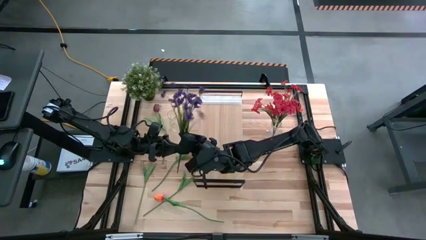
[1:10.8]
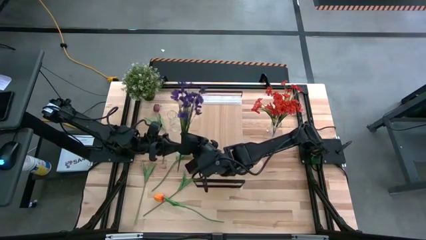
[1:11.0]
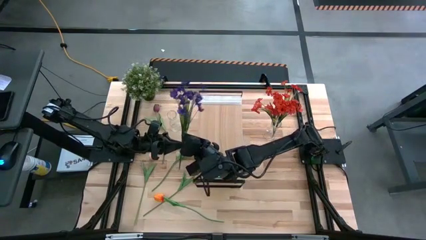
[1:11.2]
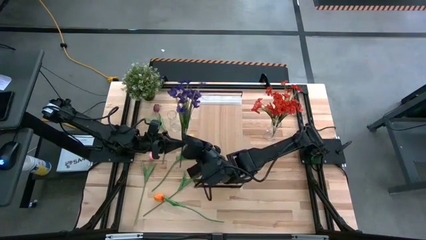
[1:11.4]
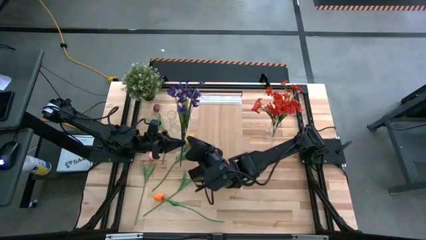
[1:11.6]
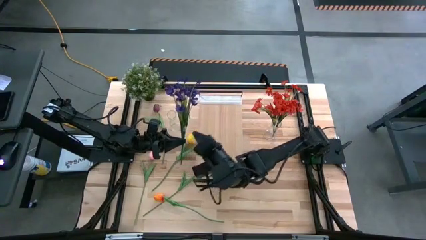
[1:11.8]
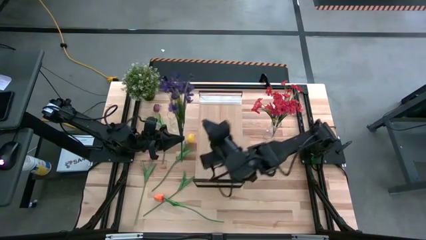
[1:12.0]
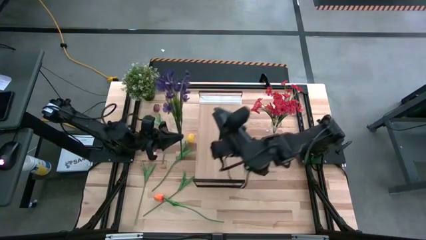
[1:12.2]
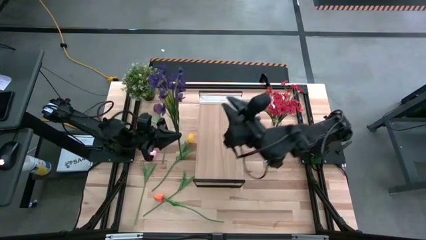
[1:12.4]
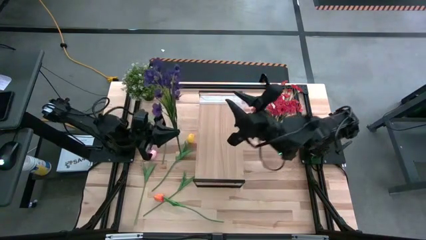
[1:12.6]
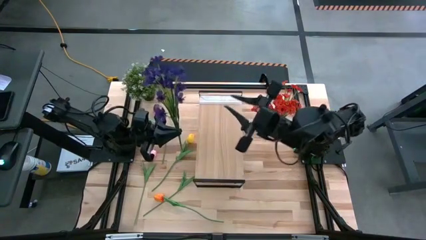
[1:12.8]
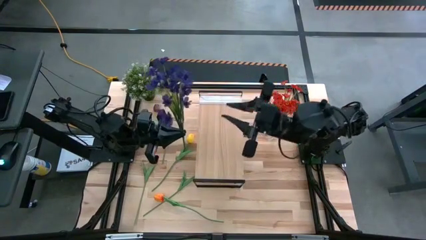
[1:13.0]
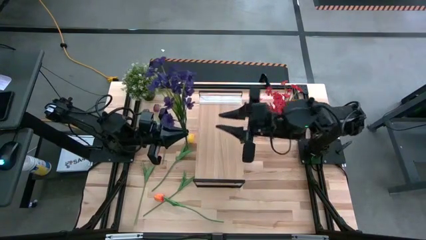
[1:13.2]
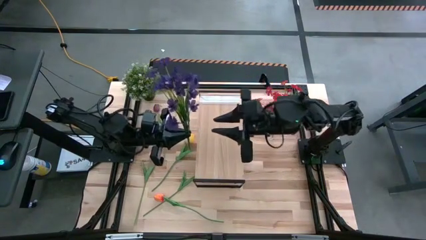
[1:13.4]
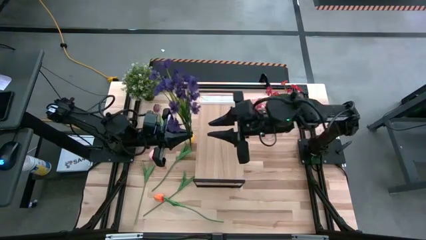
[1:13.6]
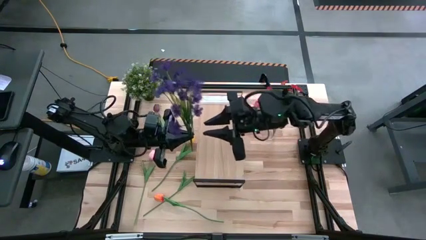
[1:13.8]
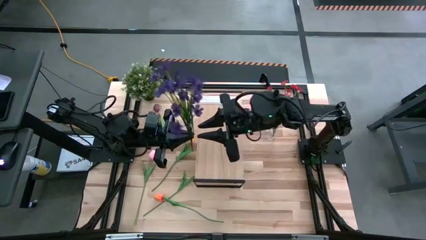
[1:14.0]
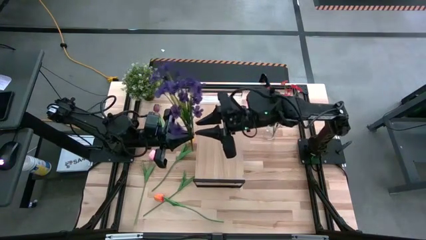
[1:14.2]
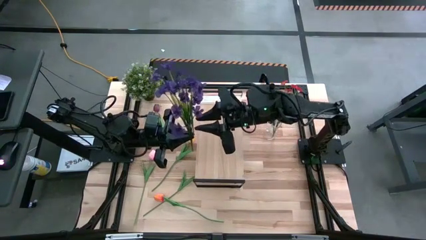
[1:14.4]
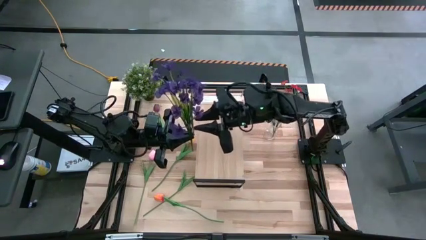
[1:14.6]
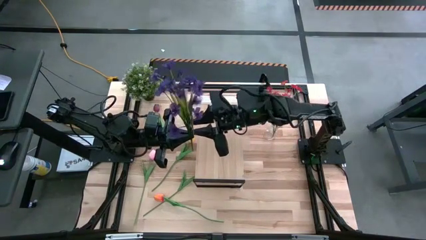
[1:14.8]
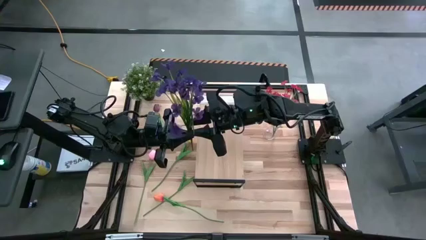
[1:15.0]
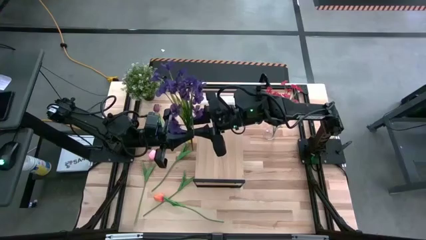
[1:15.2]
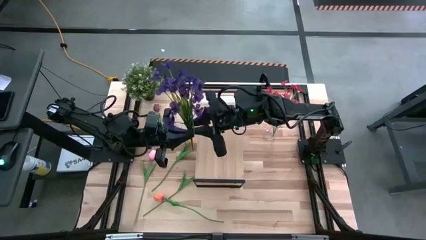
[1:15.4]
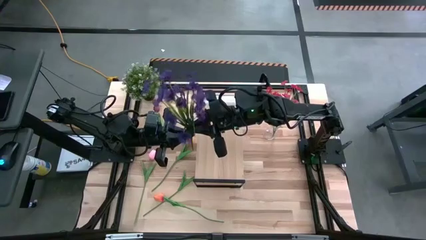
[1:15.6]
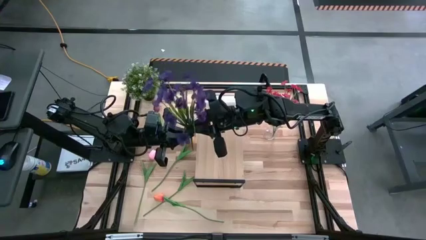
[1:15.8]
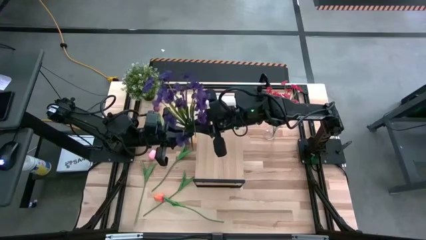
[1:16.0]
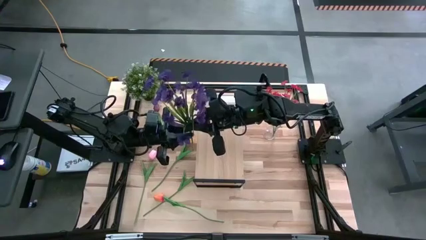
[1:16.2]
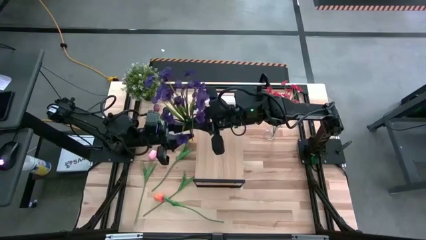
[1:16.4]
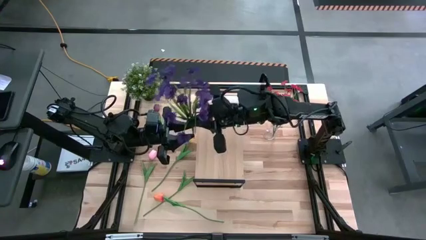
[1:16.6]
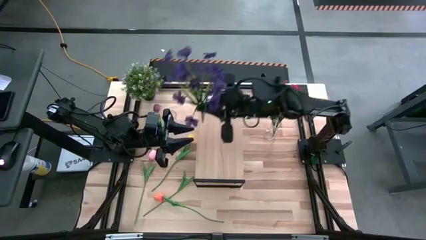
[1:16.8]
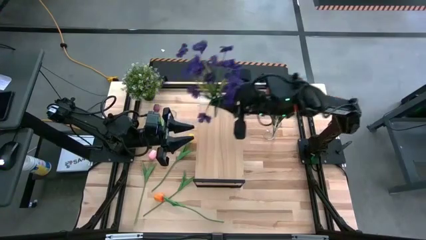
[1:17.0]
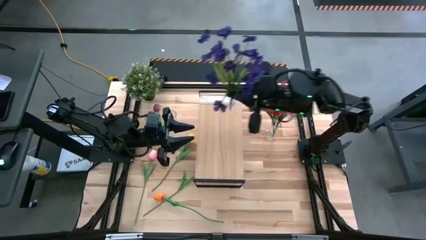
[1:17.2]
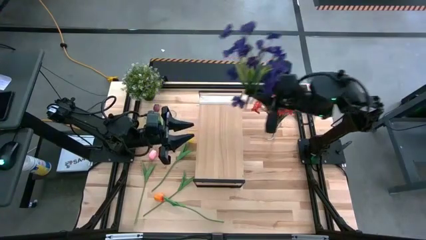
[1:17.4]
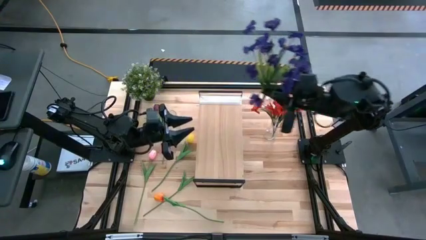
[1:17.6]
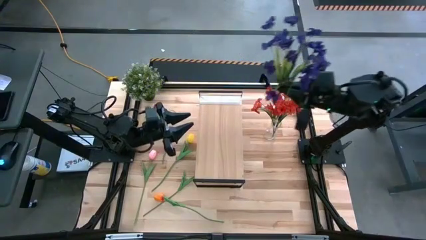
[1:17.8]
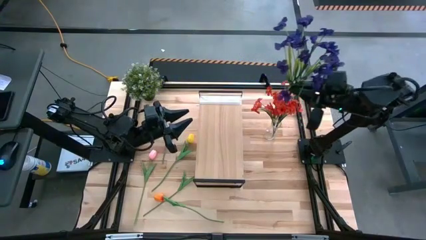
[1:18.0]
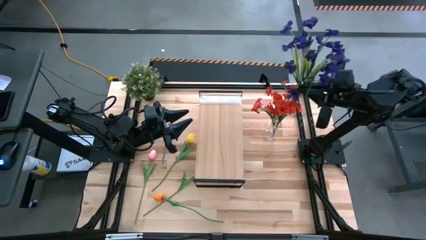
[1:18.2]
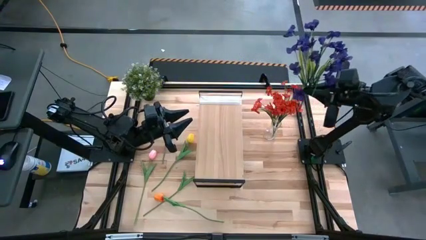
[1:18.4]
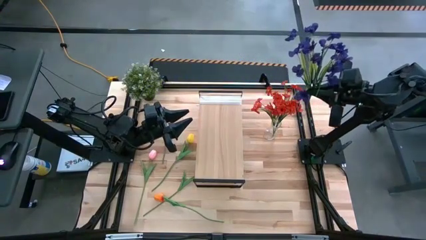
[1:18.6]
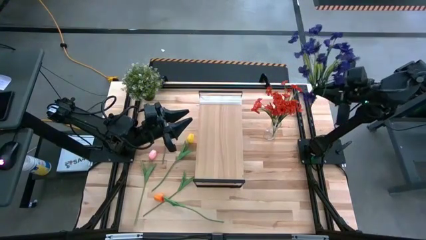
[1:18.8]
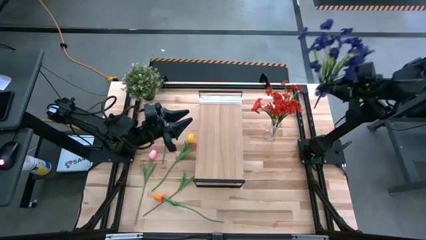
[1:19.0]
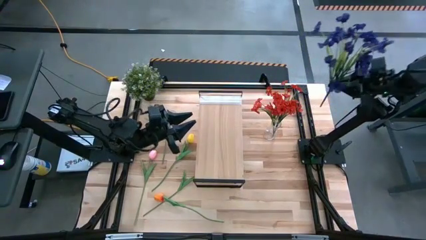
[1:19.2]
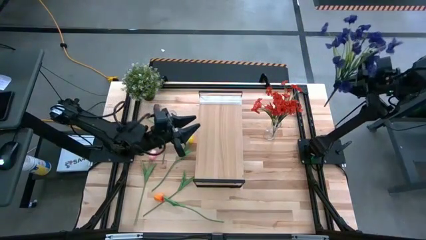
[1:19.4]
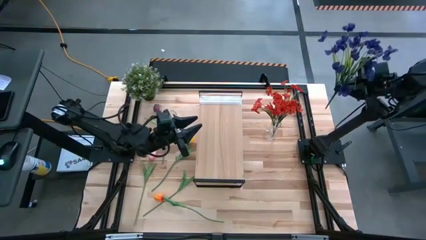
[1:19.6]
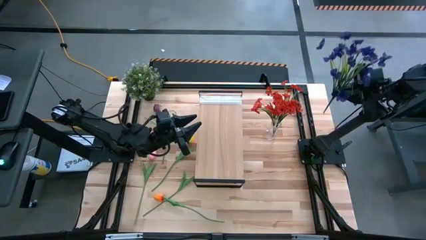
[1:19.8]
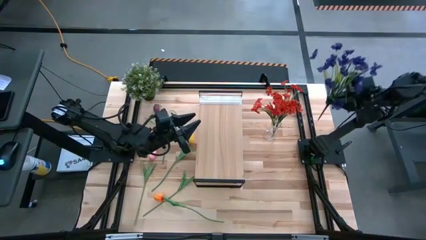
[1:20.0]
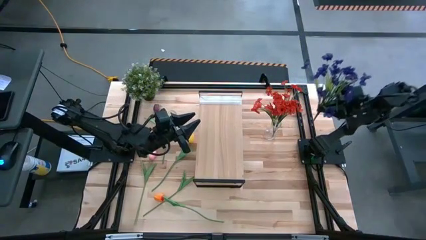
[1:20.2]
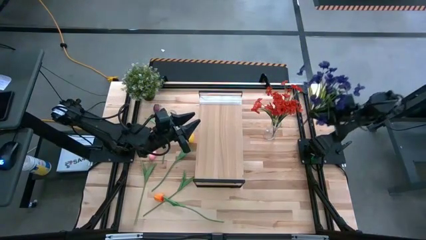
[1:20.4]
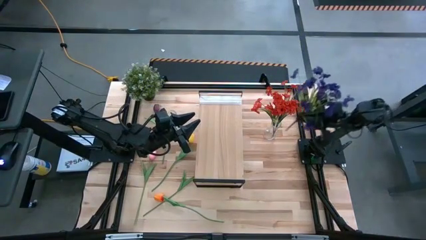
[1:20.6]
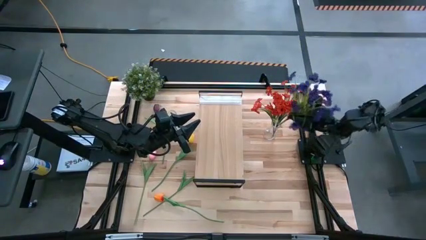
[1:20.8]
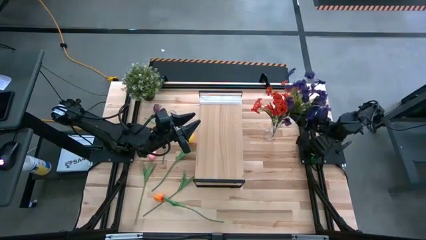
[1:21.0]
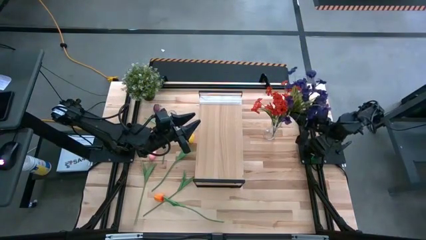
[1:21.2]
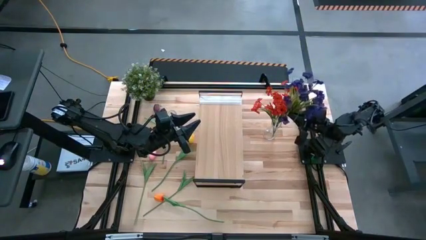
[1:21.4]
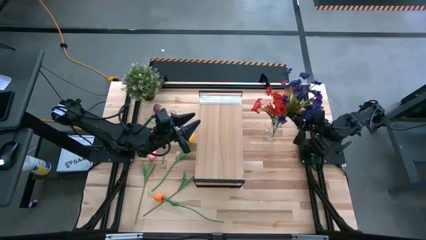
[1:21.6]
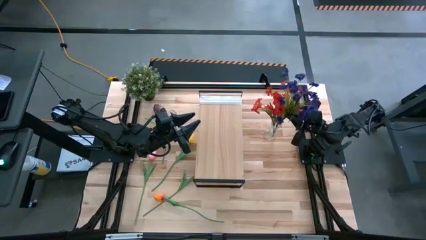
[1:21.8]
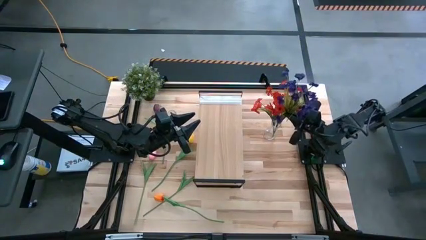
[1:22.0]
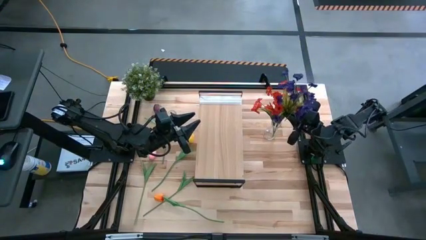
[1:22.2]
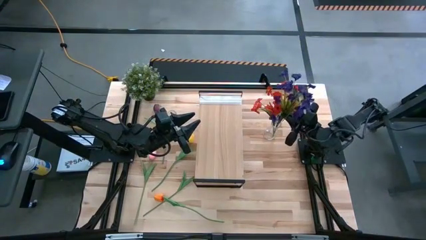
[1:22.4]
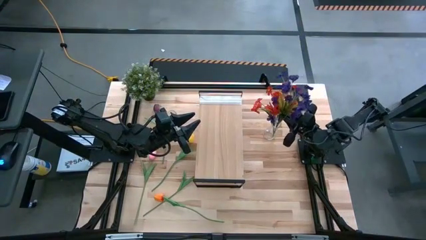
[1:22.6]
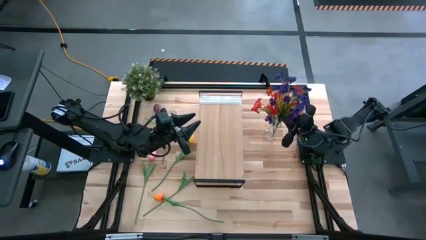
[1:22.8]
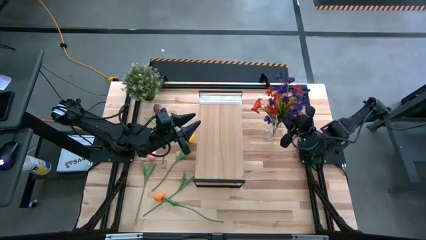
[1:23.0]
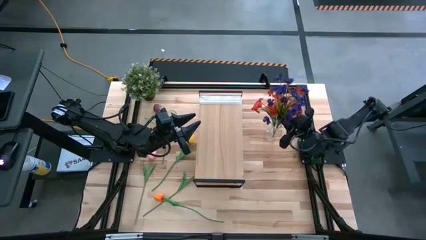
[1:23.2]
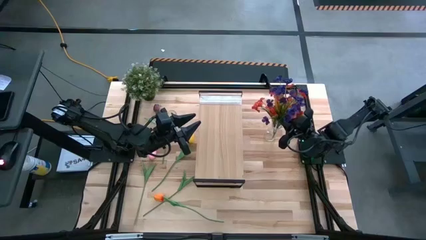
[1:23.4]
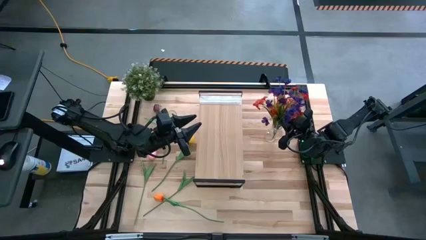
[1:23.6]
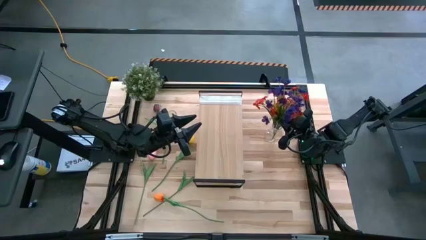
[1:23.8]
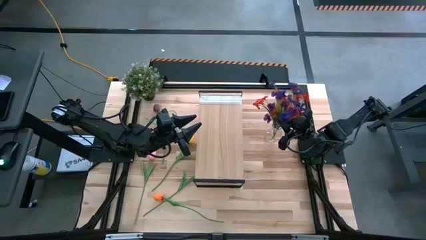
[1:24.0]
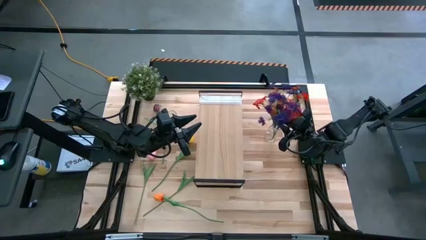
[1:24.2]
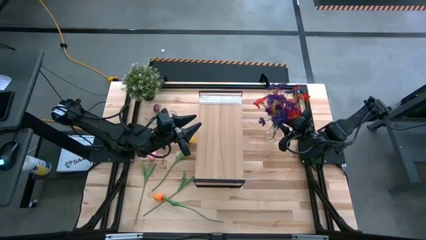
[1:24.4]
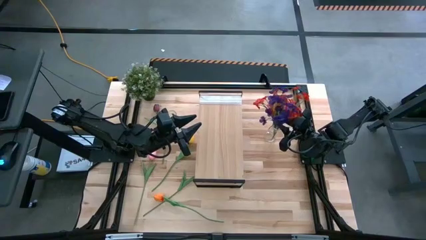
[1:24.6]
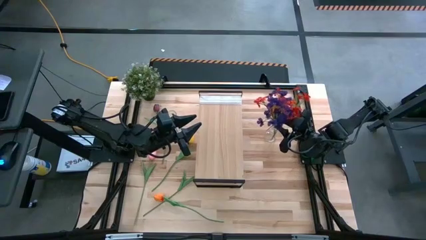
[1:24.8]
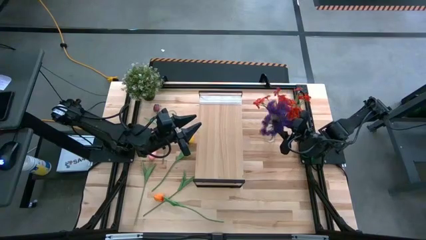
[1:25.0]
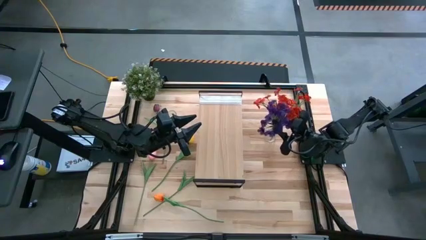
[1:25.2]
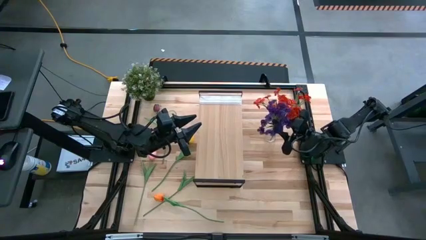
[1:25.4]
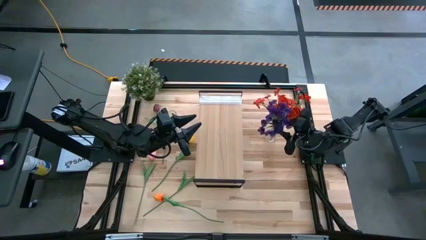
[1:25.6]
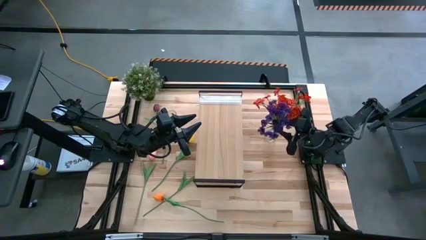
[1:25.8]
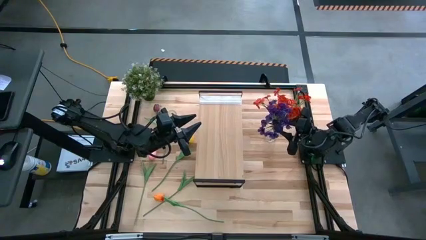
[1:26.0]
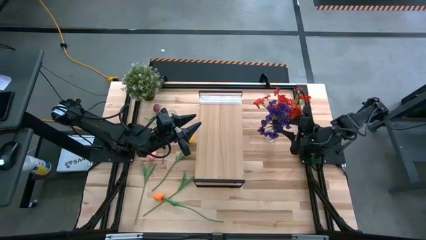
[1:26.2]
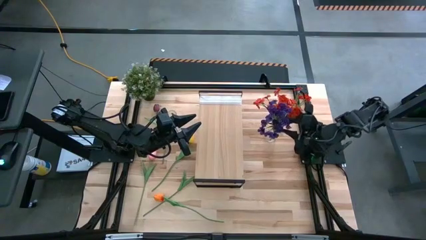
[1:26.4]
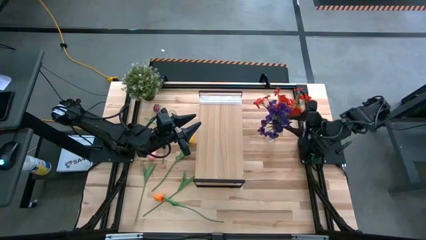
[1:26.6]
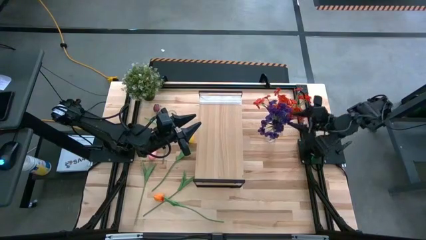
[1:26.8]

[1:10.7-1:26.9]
Task: Pick and place flowers into a vace then onto a shelf
Put the violet flowers into the right transparent vase
